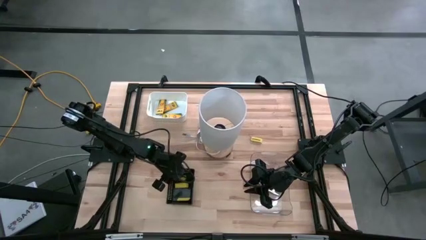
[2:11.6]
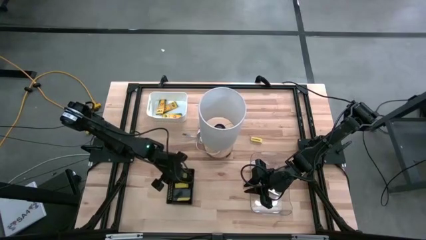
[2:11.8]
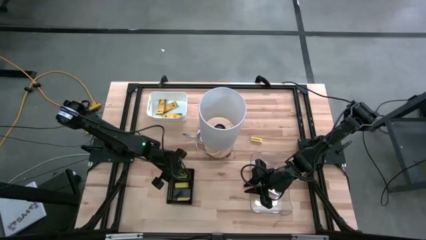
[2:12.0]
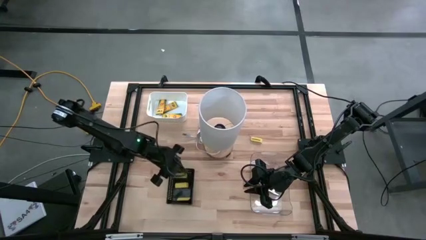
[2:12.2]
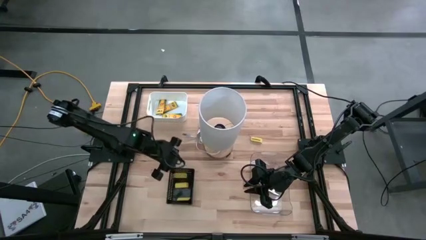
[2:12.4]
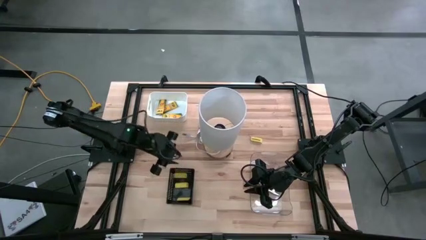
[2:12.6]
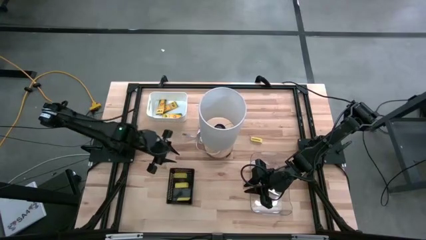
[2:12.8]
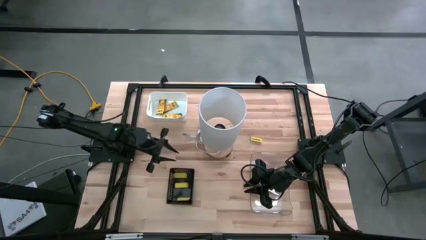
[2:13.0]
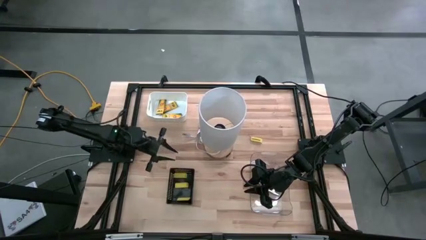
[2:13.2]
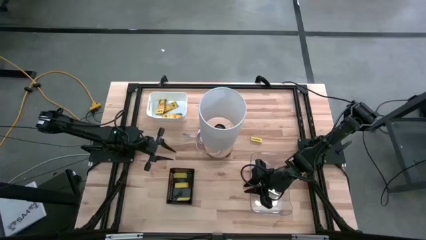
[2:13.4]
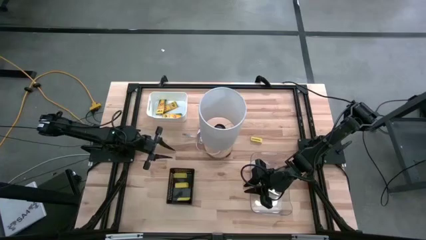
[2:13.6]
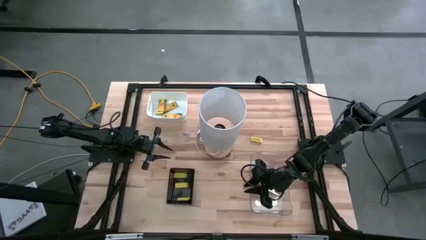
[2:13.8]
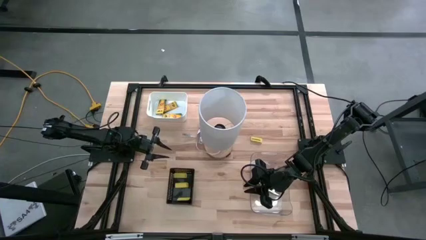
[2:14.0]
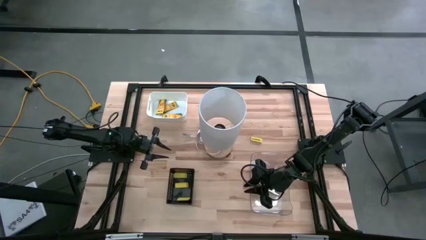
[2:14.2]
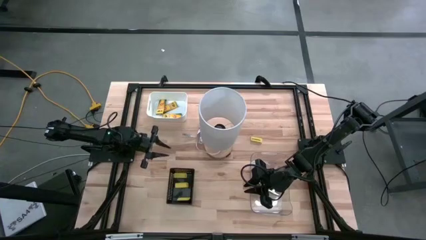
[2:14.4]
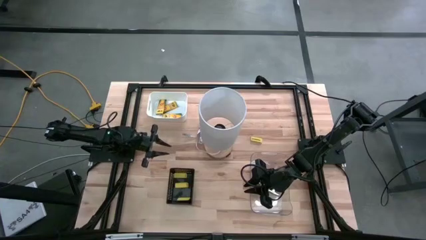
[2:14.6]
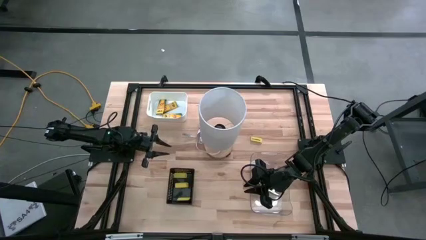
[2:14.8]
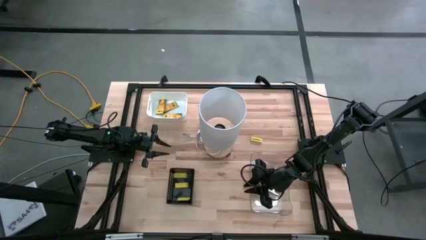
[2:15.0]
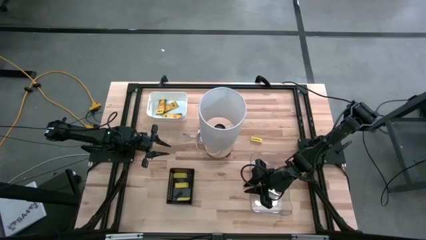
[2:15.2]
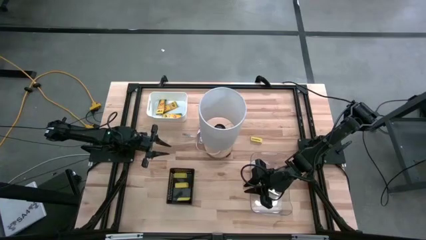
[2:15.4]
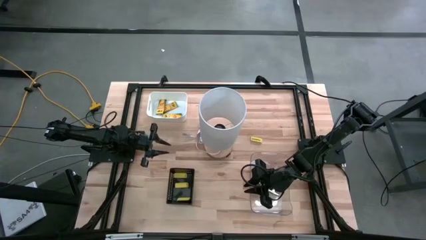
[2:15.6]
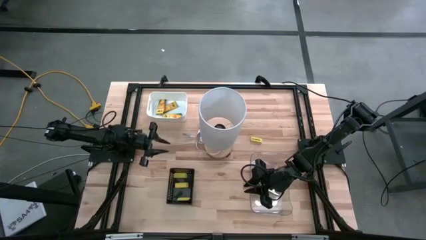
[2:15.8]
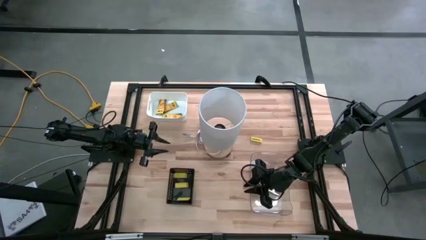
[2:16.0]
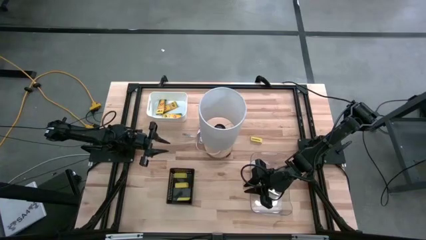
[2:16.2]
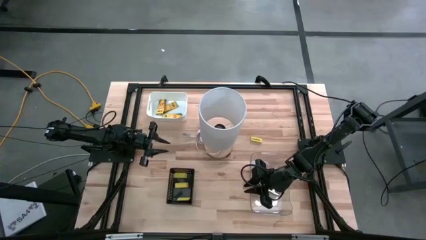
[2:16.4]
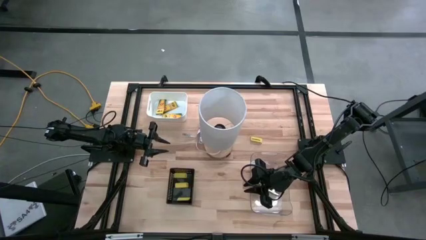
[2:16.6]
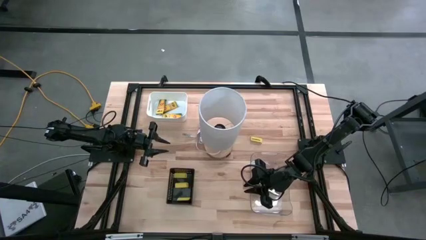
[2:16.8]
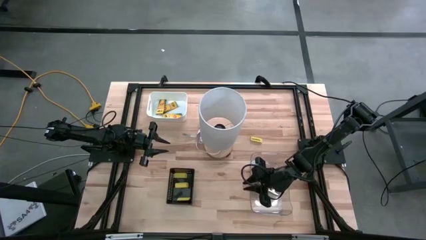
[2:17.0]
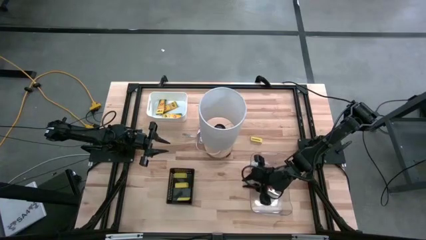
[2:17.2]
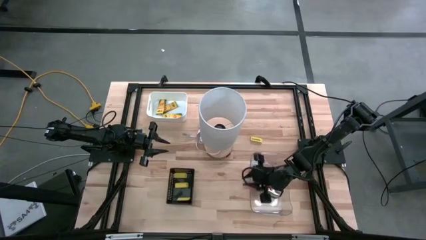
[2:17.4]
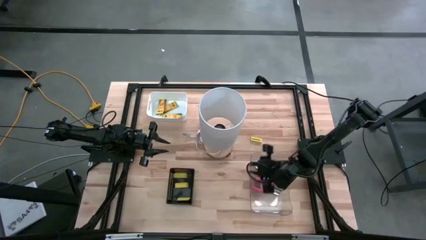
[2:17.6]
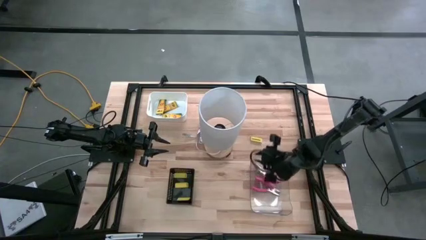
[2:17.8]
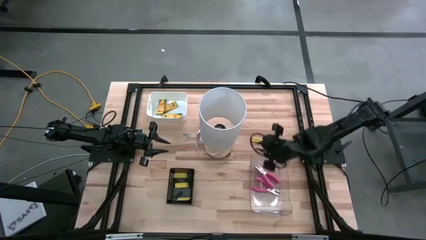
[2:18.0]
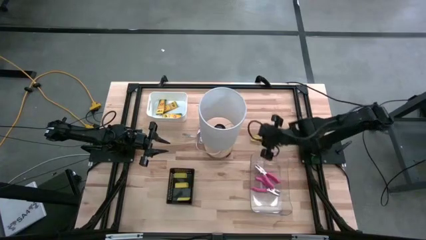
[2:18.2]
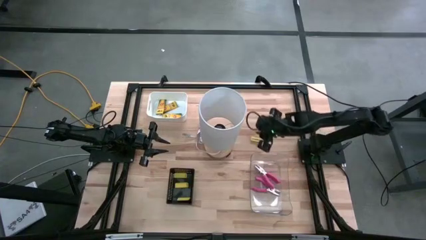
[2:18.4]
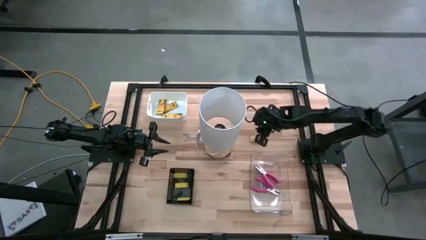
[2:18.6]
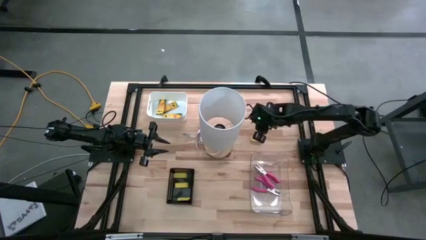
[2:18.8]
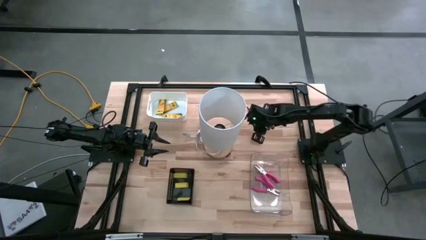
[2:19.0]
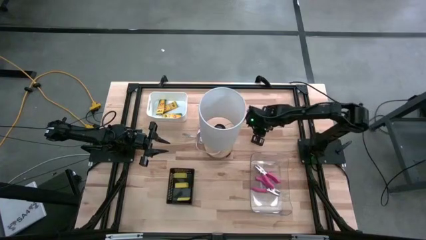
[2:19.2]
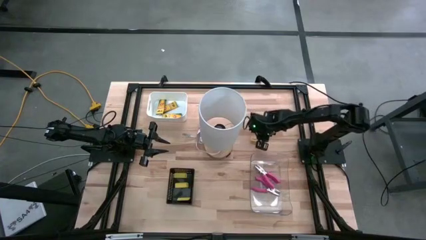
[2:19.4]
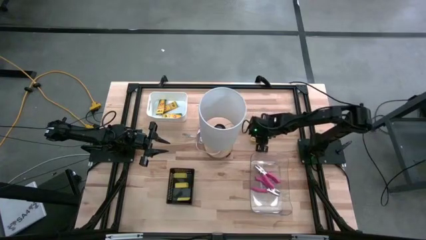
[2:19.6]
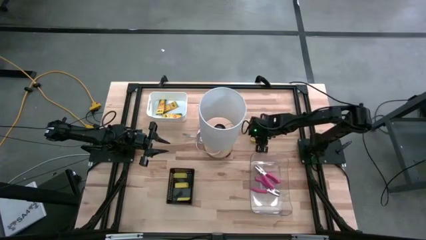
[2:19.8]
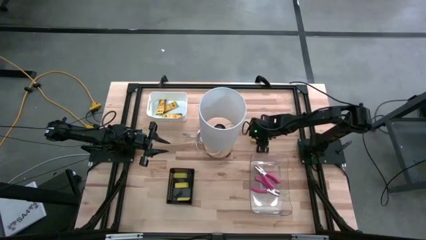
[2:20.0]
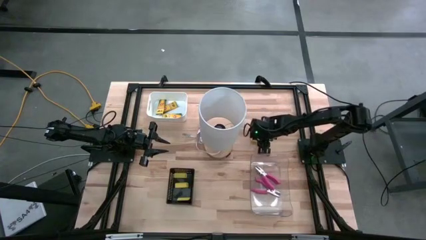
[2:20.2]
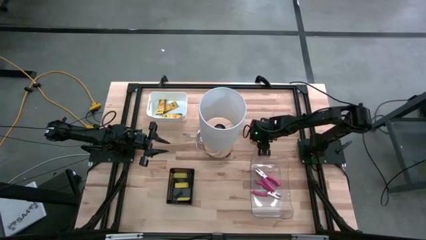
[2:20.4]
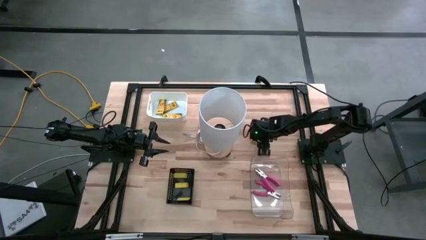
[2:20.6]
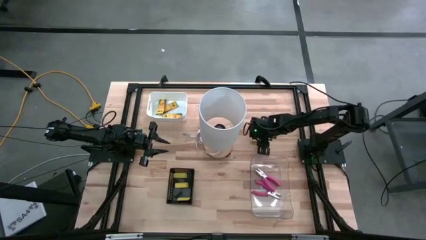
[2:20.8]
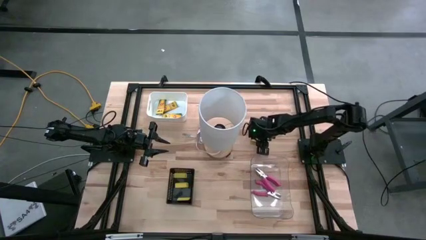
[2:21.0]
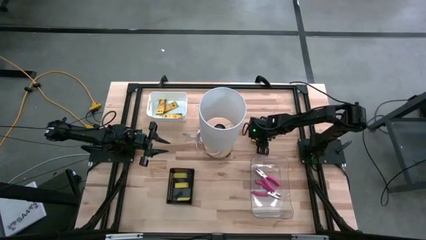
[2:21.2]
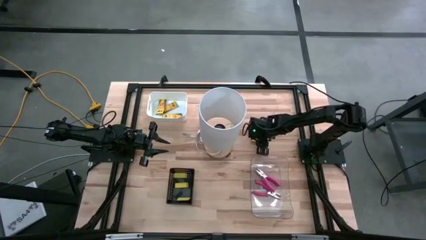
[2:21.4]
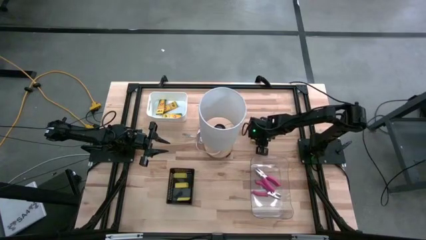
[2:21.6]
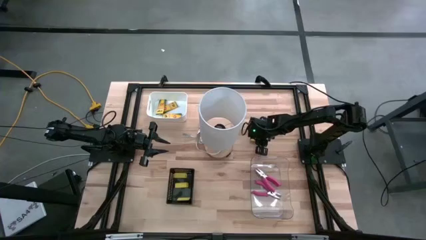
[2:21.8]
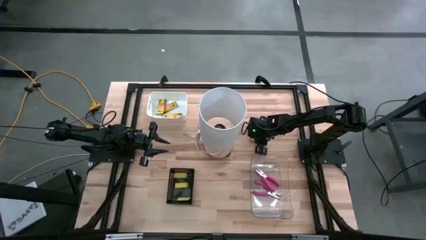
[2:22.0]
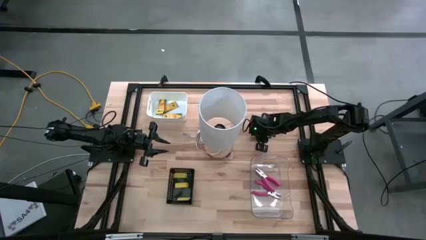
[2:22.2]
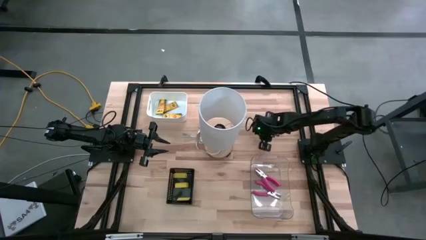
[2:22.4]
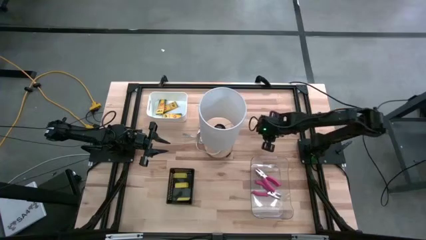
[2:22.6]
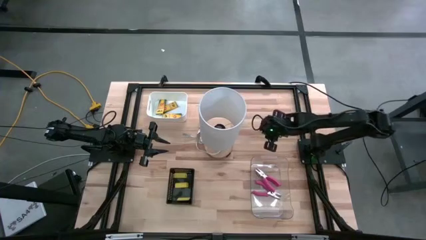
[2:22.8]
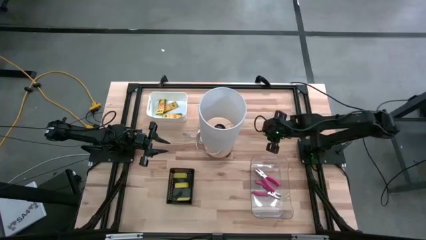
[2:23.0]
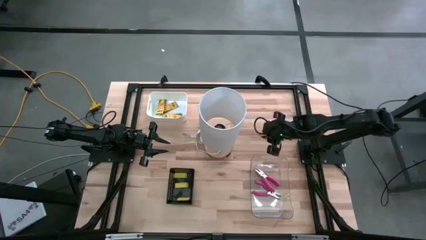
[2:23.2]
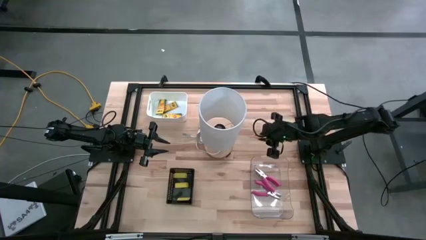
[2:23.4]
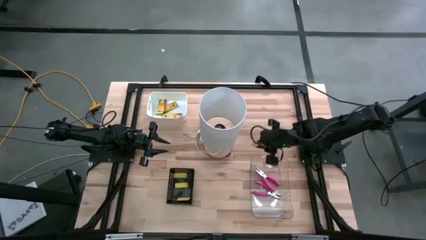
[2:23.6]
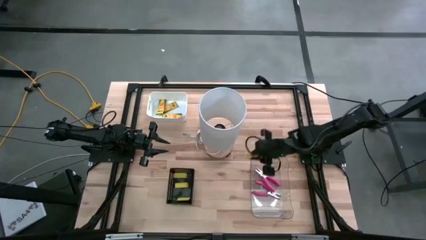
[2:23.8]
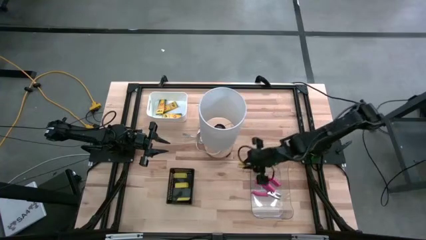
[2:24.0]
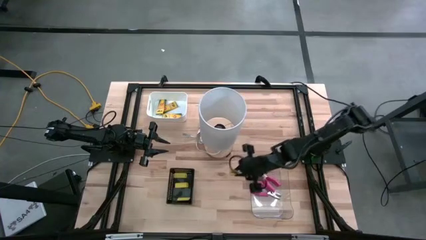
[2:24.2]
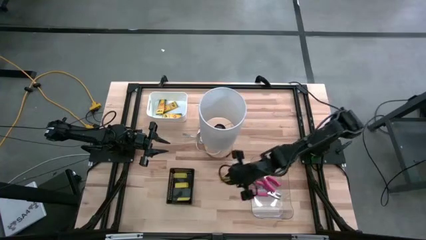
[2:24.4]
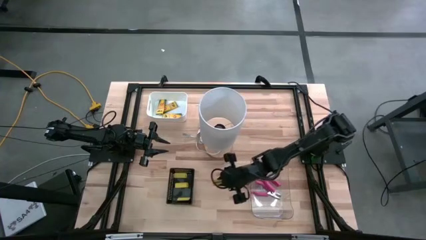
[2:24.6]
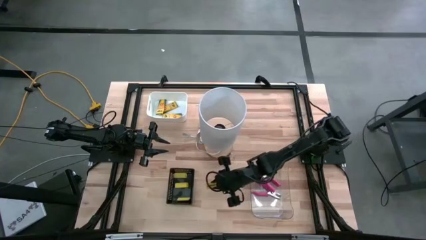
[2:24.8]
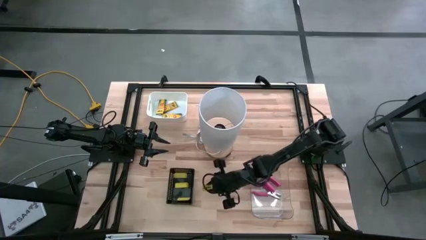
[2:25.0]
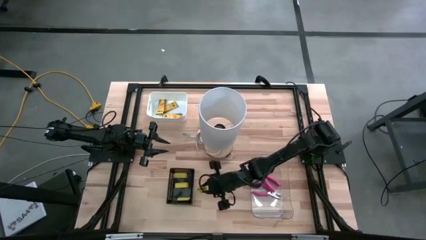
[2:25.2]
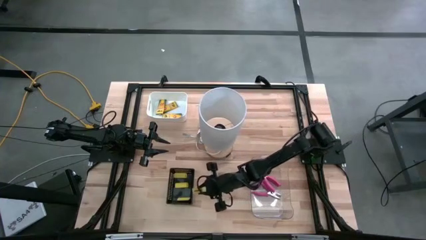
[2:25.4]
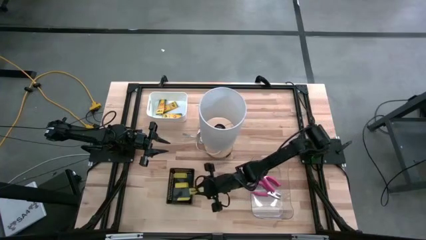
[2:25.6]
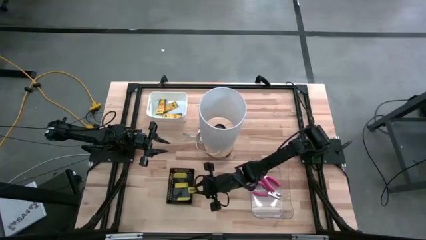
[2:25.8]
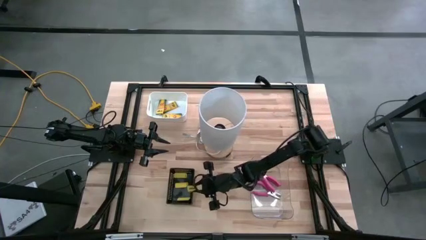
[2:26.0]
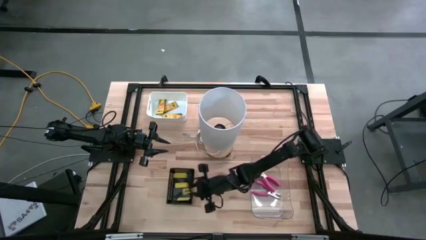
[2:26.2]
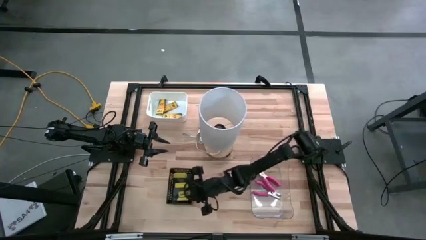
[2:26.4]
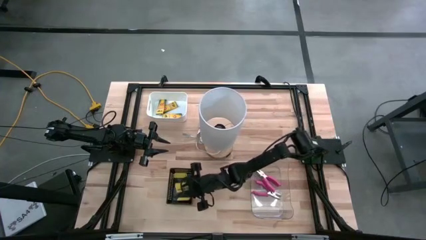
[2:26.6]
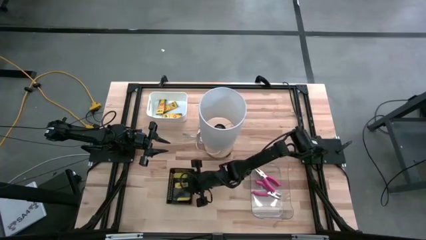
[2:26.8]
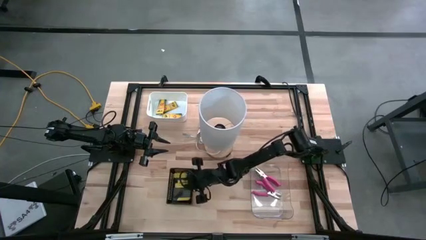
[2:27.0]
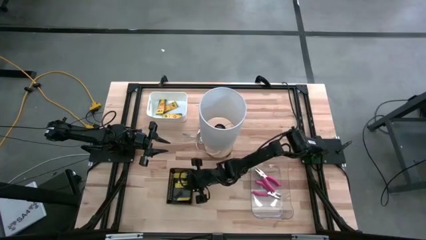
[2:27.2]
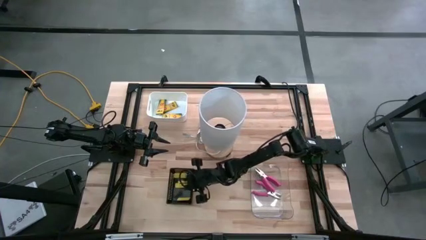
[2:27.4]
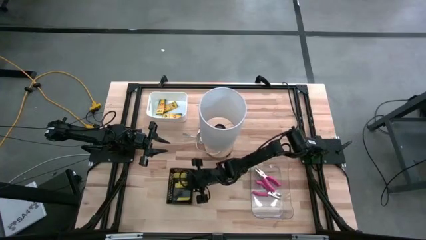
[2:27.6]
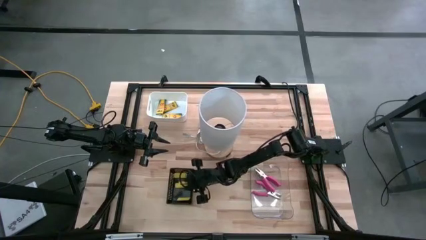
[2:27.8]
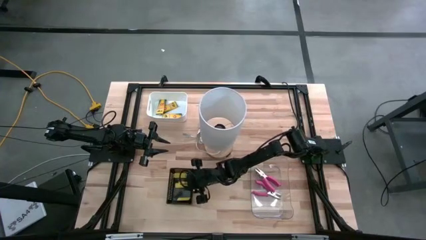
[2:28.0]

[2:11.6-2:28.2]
Task: Pick & Place School Supplies
Put the yellow eraser into the black bin

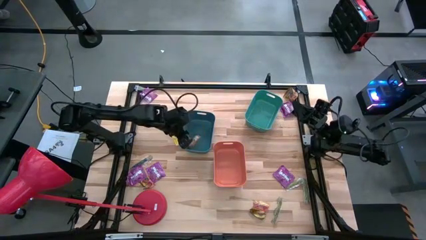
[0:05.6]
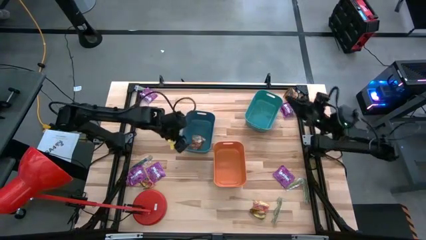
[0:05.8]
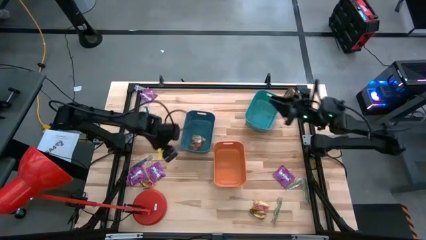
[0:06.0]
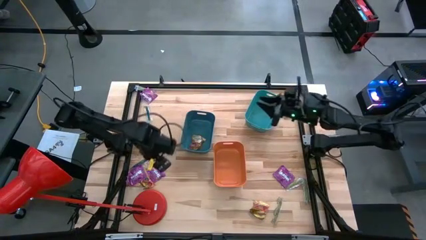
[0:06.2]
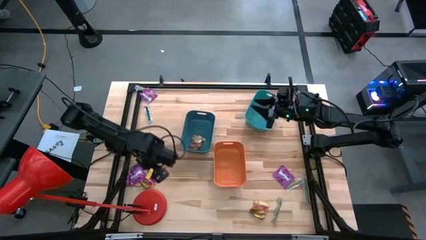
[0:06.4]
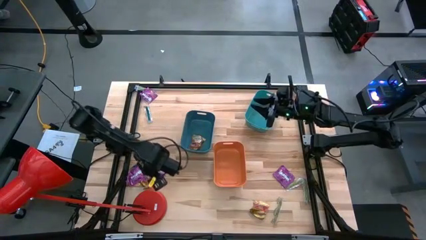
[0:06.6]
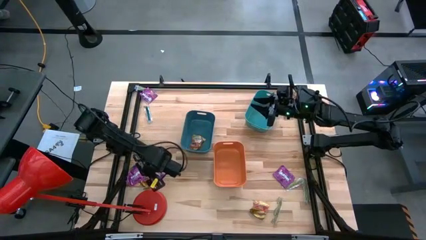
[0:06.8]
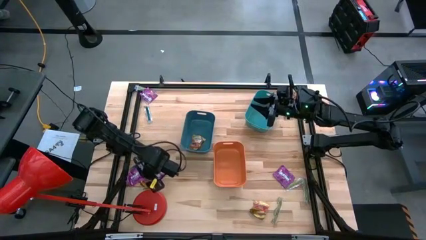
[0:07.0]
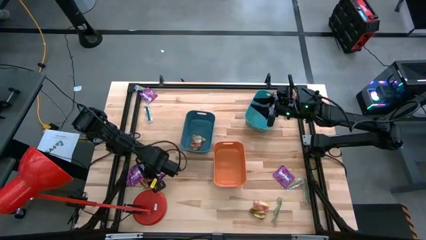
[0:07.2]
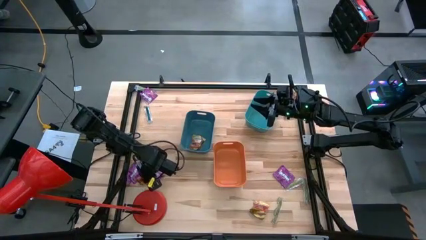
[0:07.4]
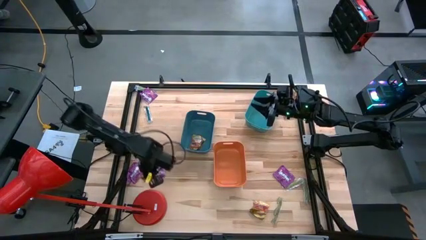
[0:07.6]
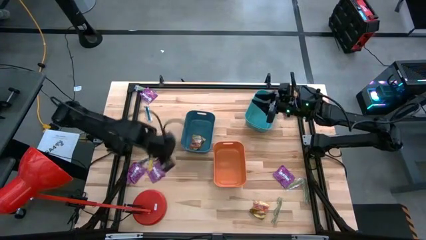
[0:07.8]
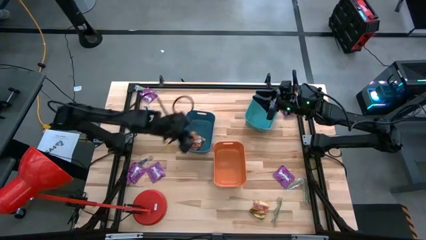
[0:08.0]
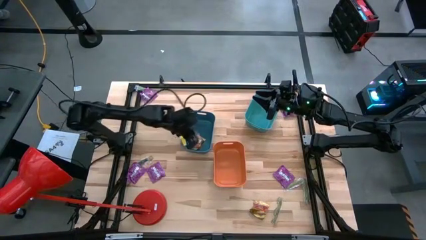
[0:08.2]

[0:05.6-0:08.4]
Task: Sort candy
Put the yellow candy into the blue bin
